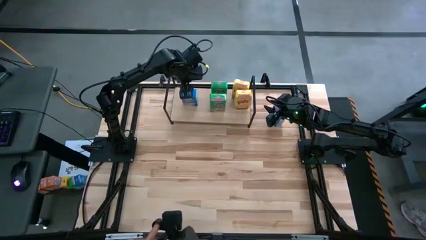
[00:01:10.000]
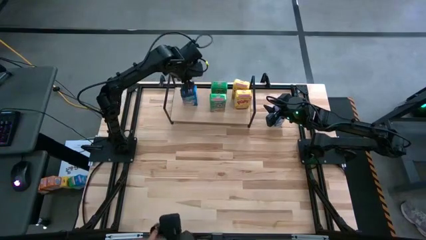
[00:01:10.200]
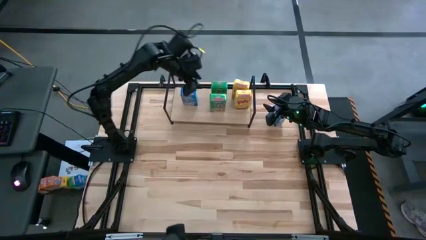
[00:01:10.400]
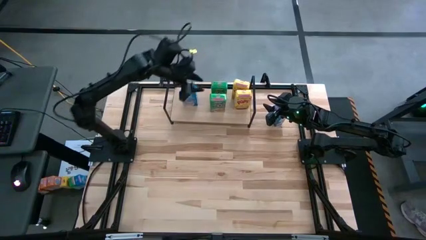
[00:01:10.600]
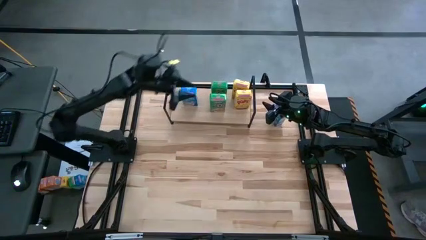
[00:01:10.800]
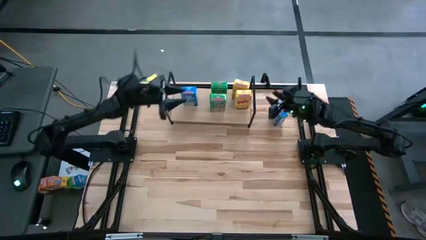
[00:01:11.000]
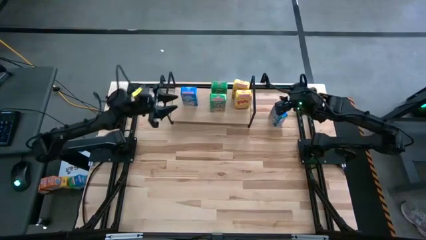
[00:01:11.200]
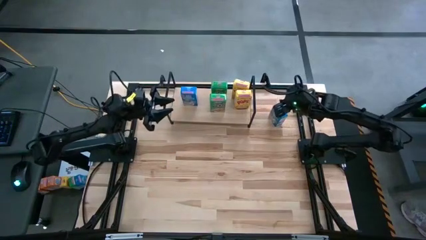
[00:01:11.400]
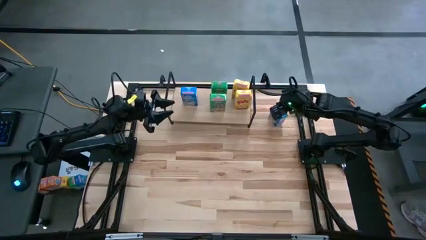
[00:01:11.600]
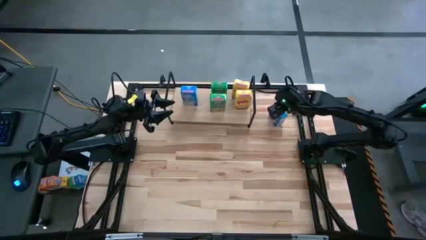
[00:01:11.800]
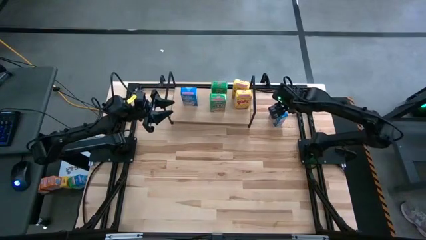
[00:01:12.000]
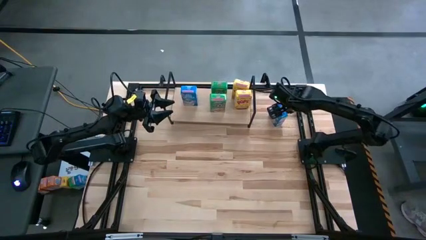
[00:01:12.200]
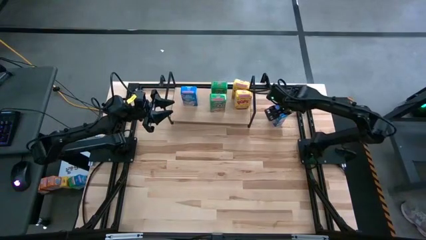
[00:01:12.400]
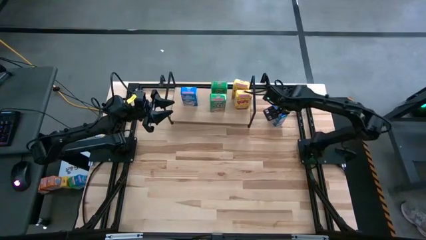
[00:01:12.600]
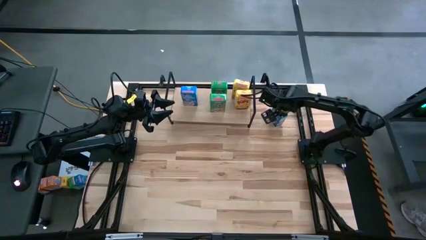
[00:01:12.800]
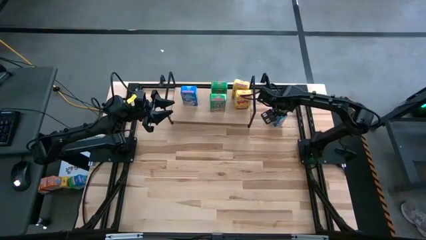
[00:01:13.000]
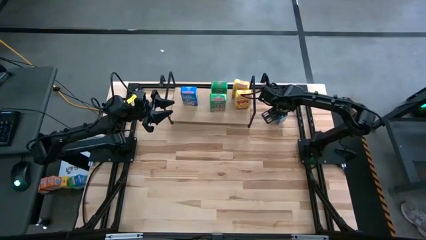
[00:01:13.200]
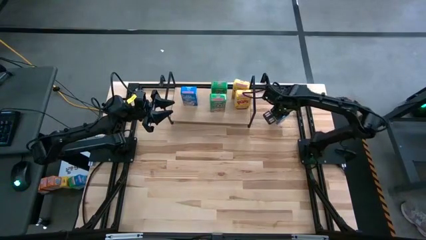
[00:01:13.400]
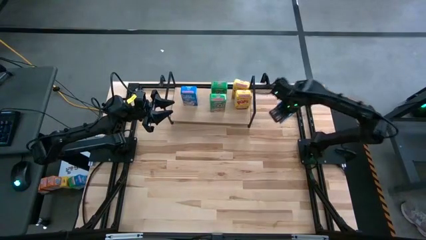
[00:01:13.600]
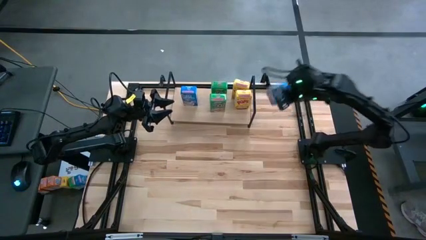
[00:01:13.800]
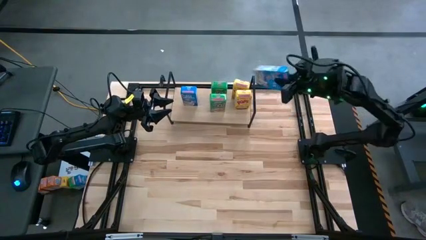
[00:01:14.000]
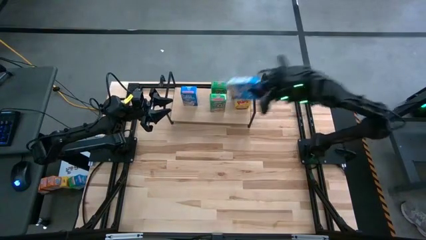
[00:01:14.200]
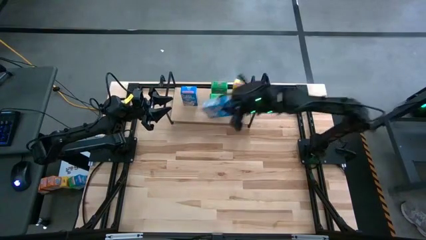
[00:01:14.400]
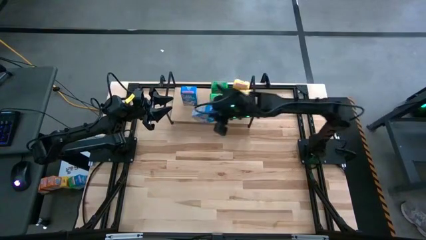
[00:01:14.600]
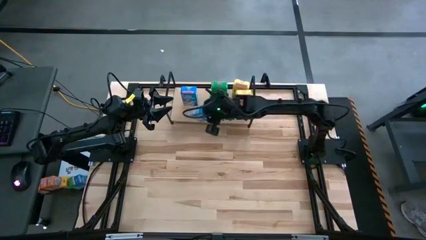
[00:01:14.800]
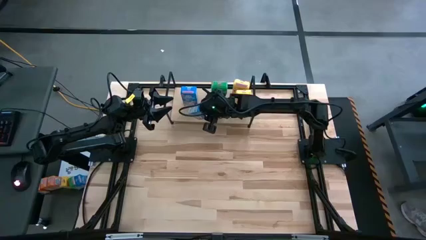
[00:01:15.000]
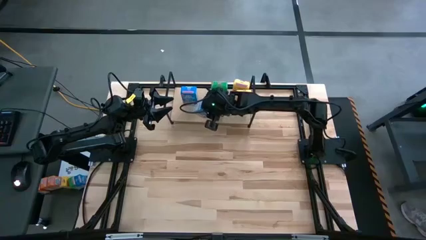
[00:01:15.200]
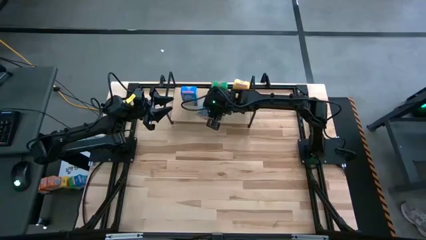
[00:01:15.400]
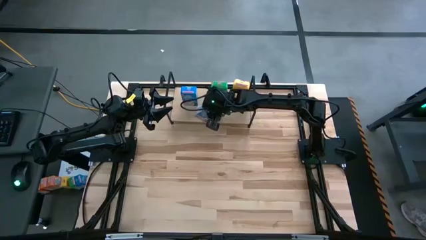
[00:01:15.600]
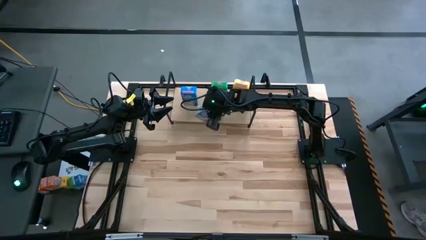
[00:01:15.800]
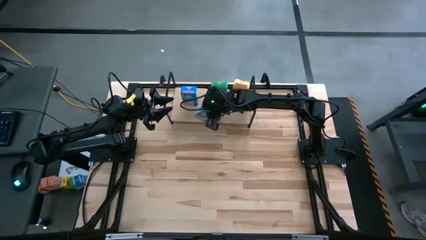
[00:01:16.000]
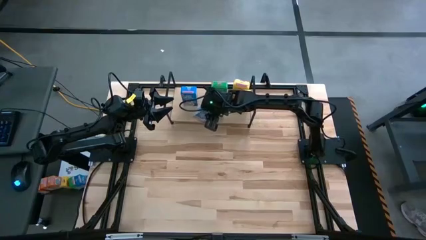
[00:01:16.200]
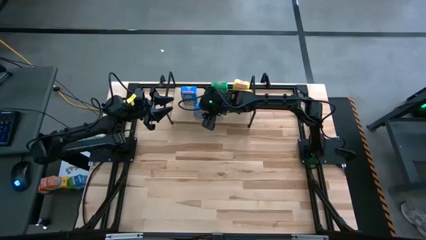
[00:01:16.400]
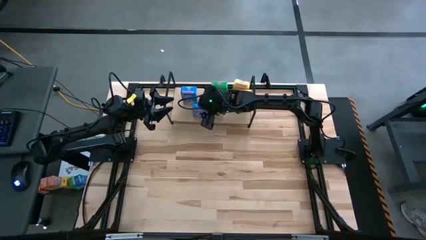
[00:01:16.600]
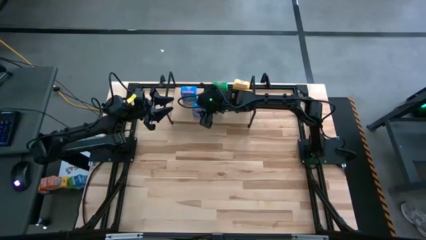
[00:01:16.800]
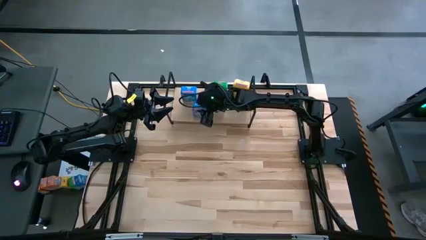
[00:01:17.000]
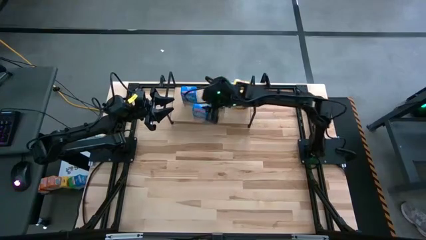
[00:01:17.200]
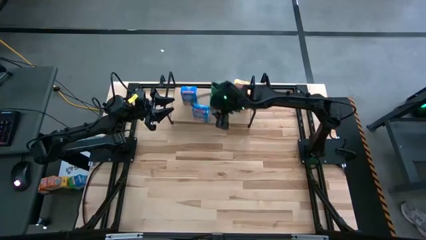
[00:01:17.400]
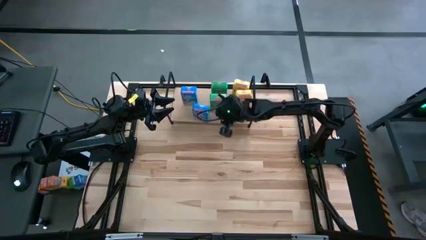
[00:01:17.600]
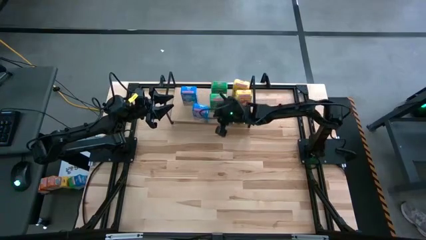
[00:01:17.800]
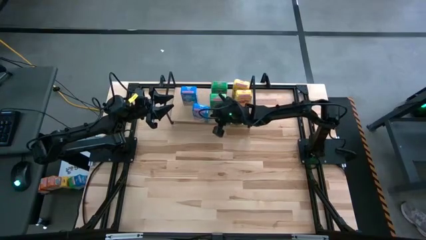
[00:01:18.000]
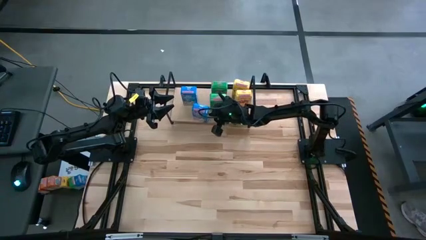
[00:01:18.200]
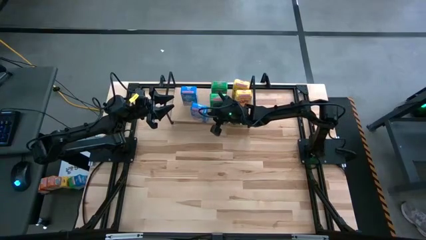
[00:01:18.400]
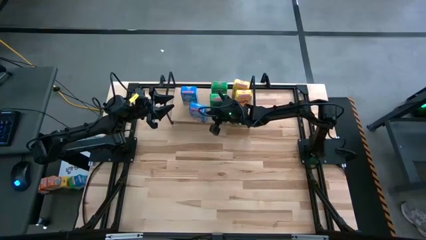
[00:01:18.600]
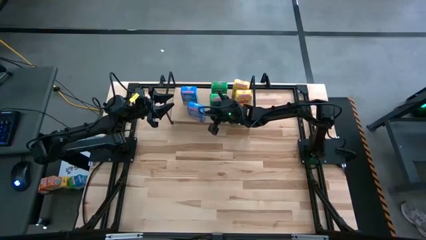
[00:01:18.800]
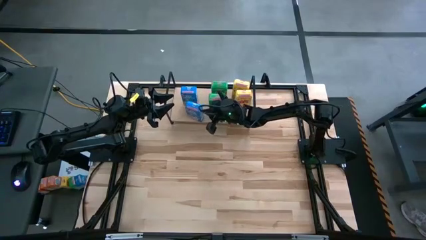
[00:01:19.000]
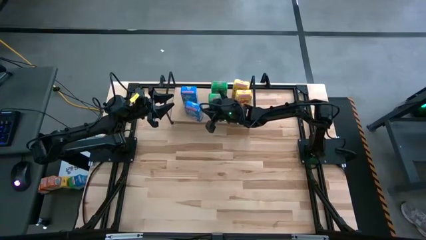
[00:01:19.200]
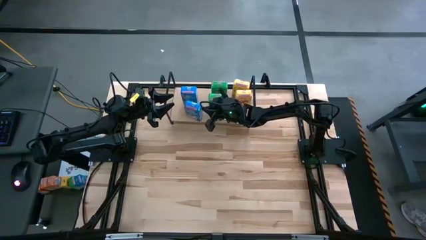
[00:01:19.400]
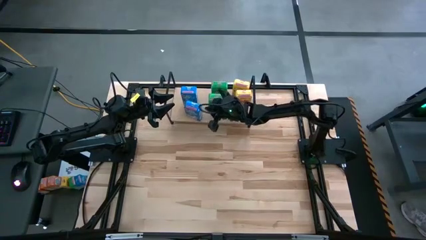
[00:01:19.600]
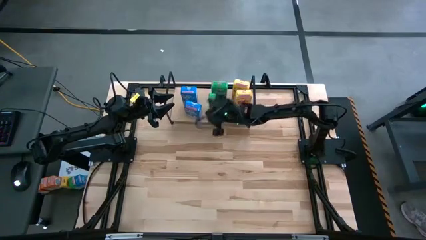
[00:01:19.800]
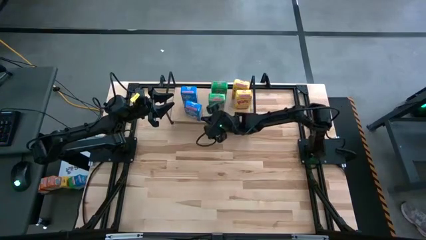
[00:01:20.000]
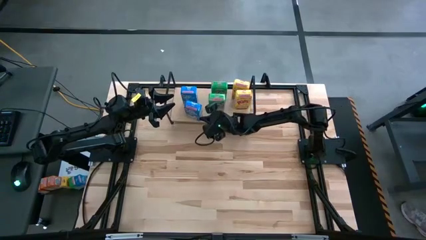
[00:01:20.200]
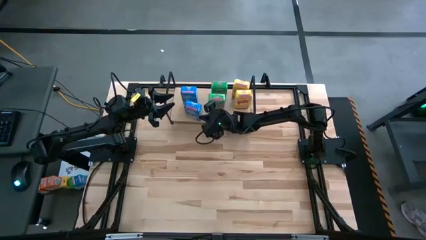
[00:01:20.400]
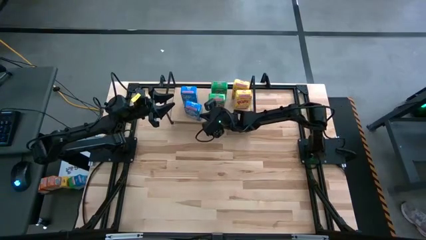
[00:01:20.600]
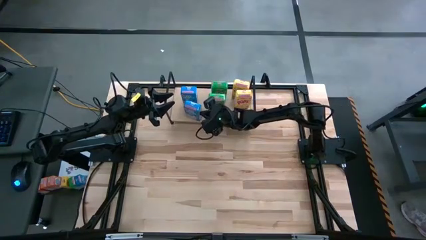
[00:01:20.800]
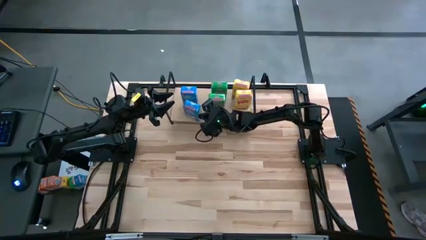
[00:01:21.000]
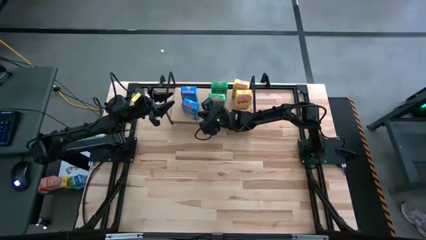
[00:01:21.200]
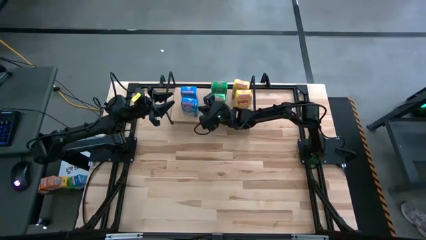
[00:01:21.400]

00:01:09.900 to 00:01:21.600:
Task: Stack cereal on shelf
Put the blue cereal box on the shelf aligned with the other blue cereal box

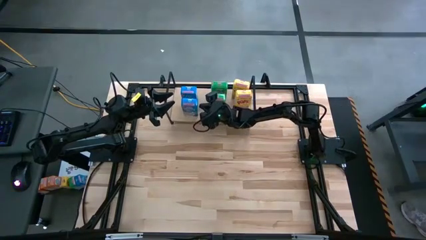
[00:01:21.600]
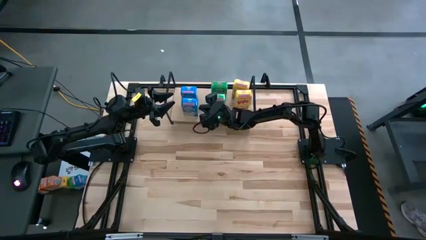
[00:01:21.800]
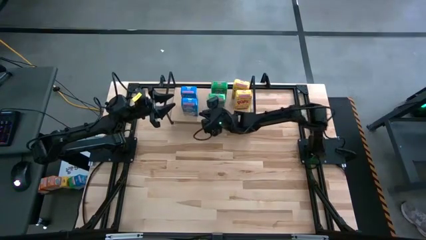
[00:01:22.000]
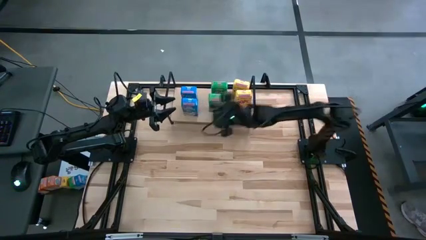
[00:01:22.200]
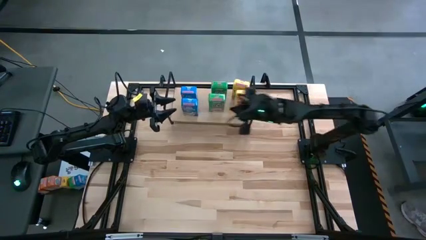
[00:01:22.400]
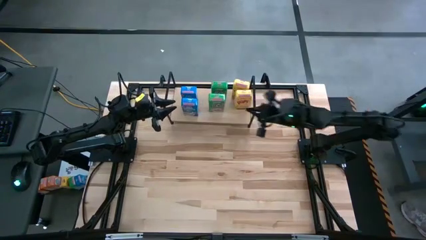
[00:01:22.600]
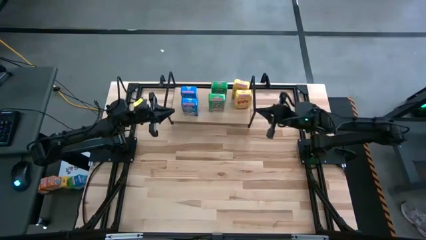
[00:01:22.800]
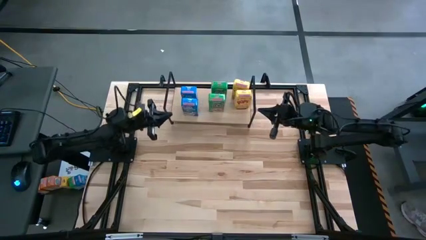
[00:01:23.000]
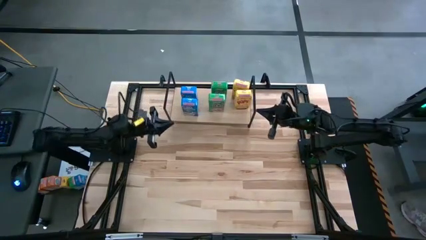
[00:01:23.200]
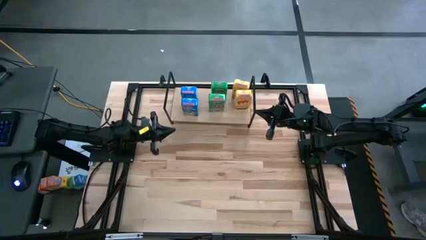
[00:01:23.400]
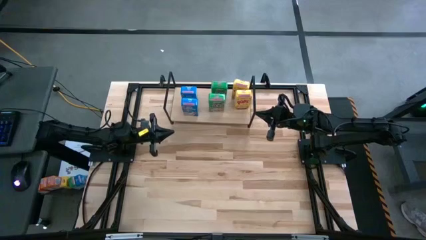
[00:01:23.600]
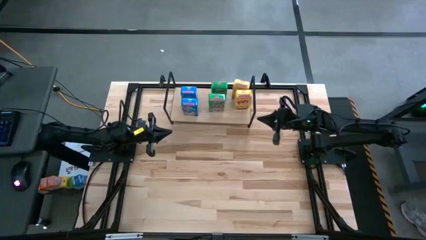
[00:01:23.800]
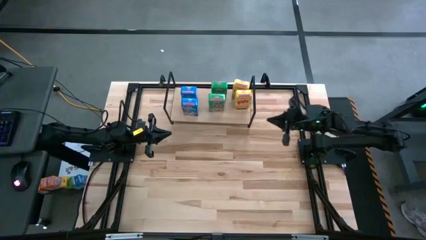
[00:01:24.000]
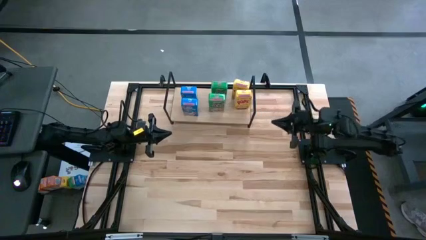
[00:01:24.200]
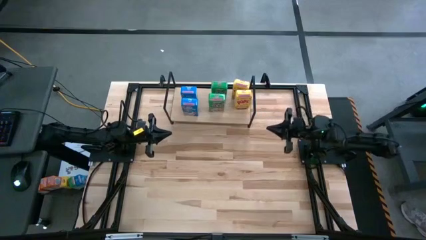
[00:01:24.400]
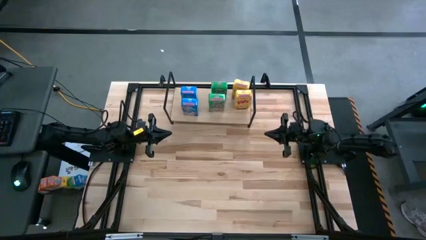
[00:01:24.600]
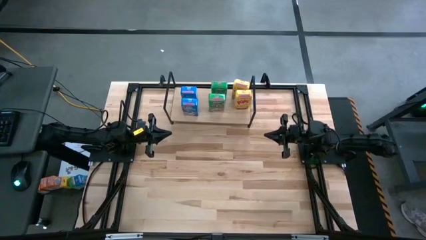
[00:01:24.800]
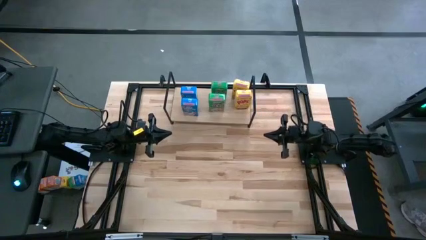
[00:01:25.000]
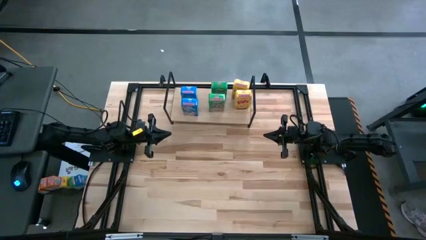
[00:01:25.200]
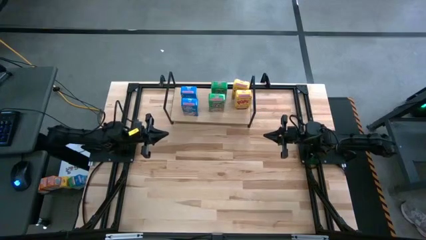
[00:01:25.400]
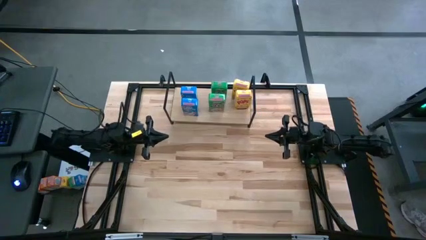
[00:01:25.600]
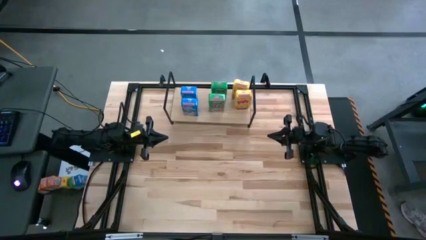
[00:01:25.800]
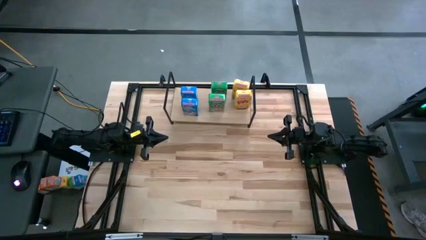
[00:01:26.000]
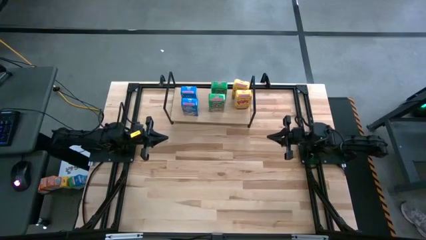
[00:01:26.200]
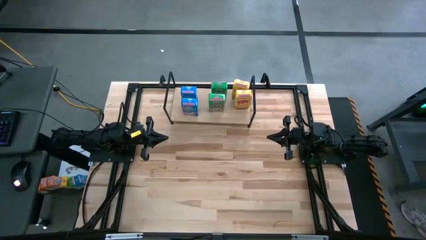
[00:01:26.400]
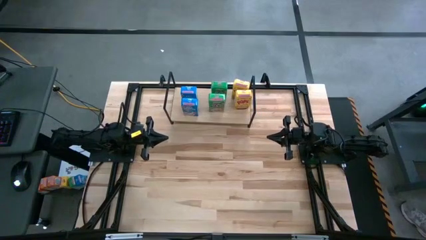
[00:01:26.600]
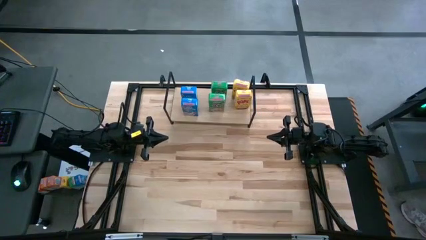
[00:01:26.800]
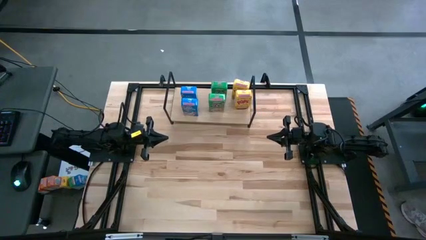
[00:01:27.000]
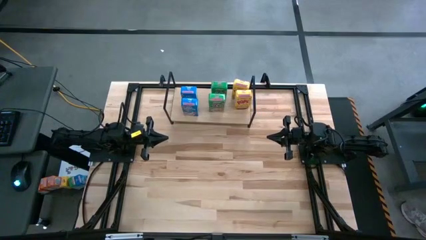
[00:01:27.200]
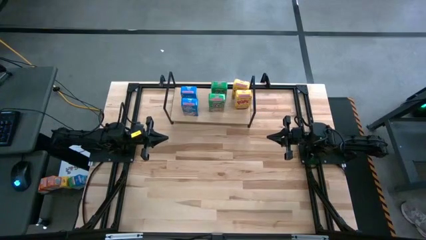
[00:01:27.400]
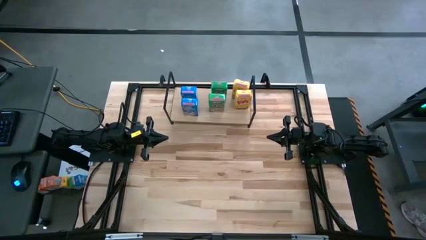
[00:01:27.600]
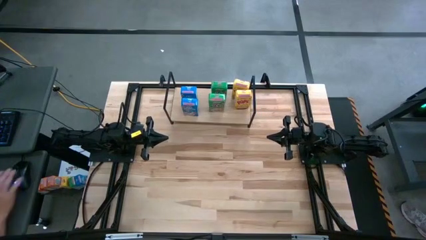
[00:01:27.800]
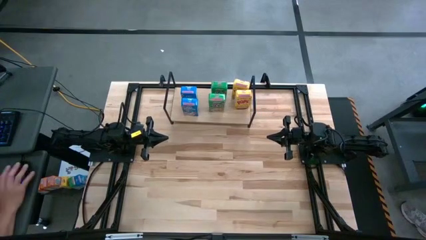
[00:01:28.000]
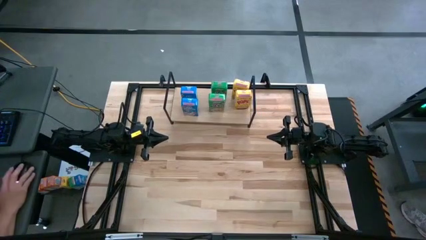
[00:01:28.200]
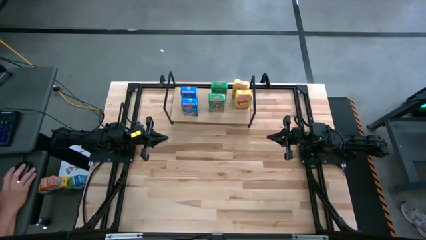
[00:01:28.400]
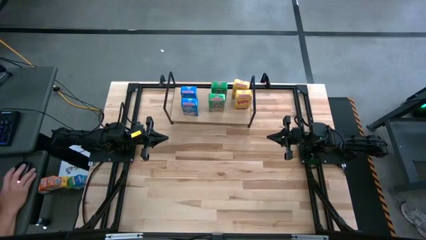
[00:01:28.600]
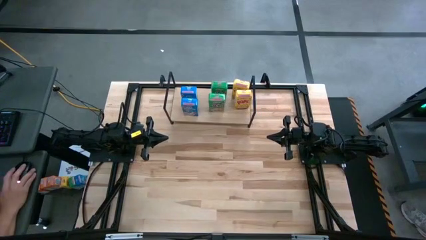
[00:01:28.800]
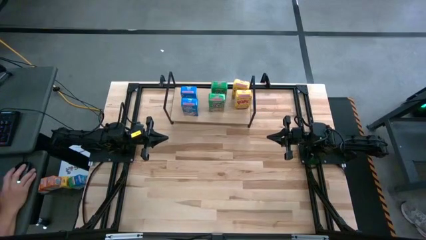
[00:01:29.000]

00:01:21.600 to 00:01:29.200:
Return to Home Position
